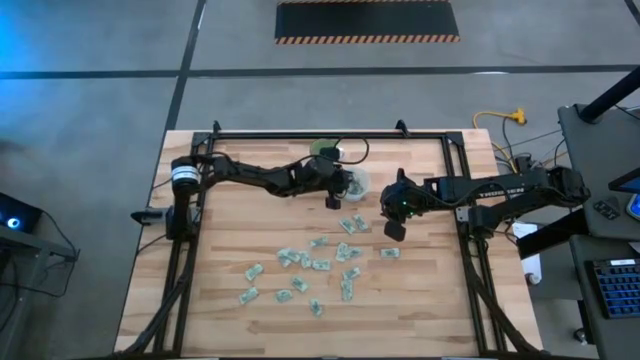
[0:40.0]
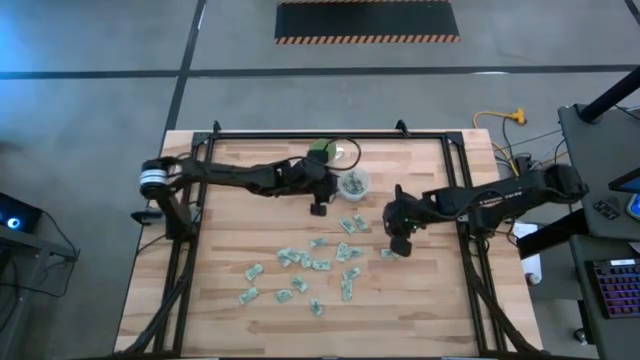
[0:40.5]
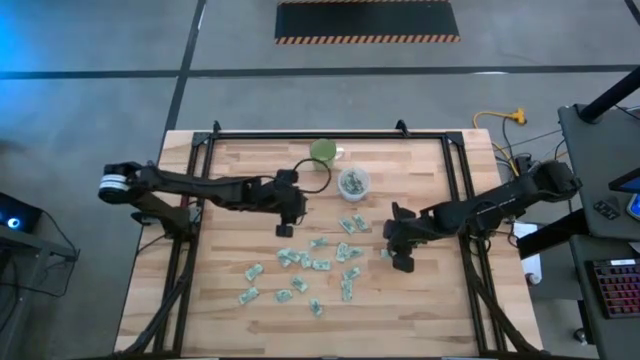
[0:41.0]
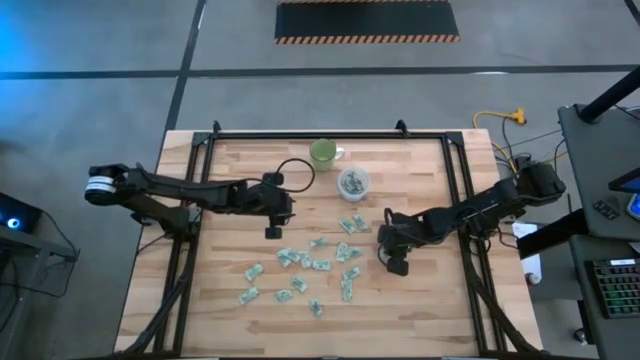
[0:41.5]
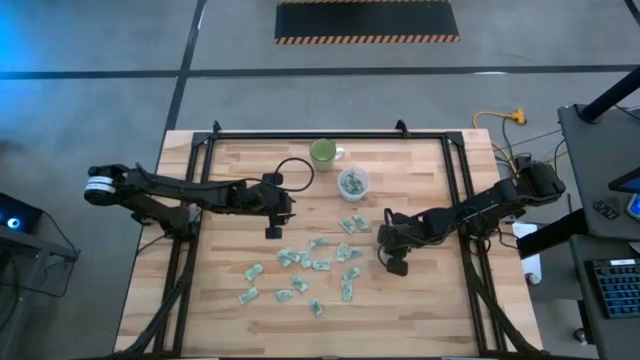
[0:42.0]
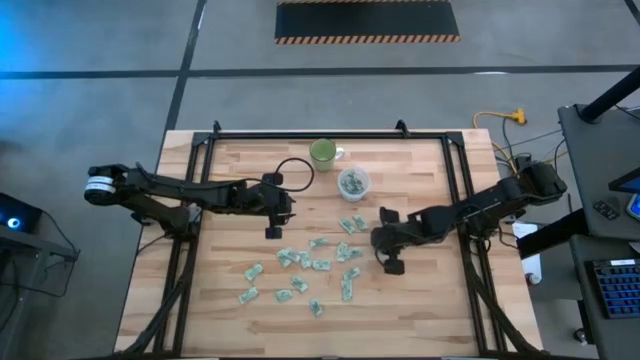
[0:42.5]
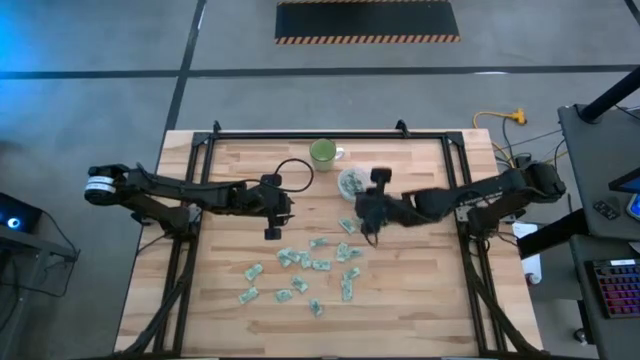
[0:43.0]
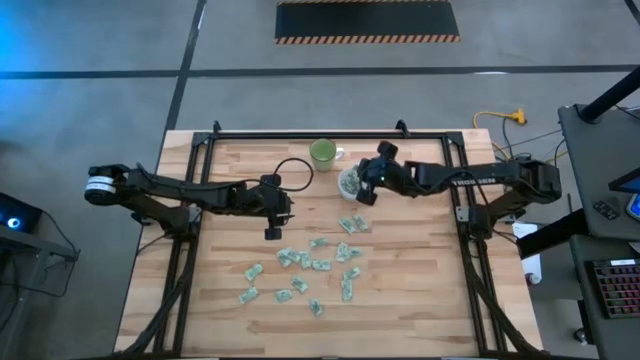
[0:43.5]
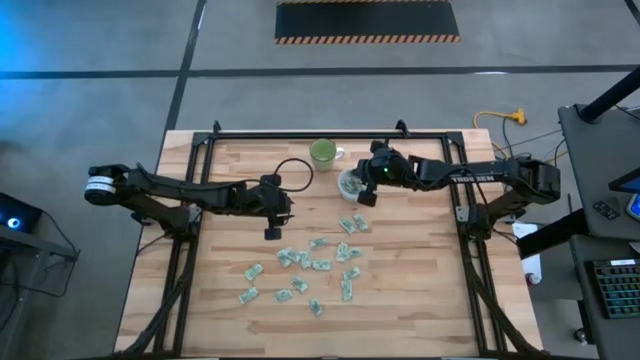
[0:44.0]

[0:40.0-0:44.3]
Task: Pick and place Stevia / Truvia into bins
Put the stevia packet into the transparent container

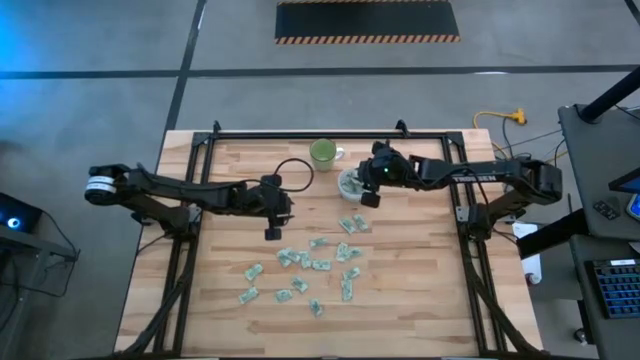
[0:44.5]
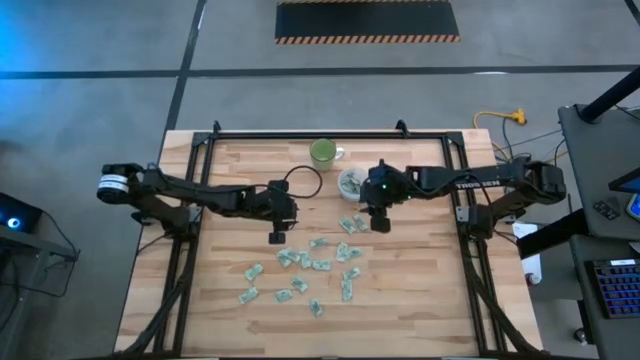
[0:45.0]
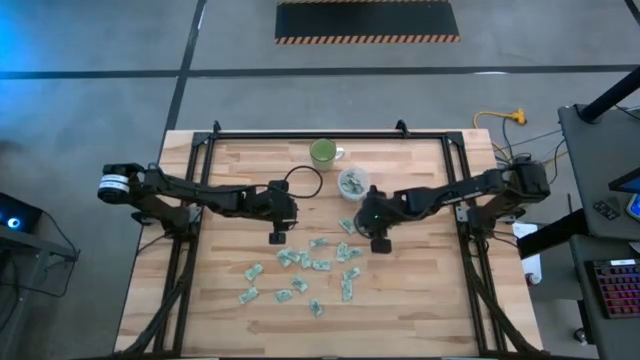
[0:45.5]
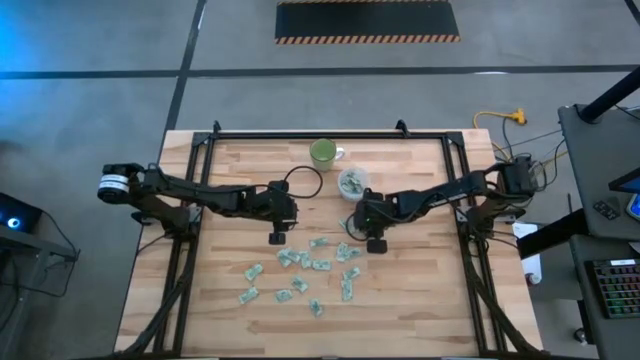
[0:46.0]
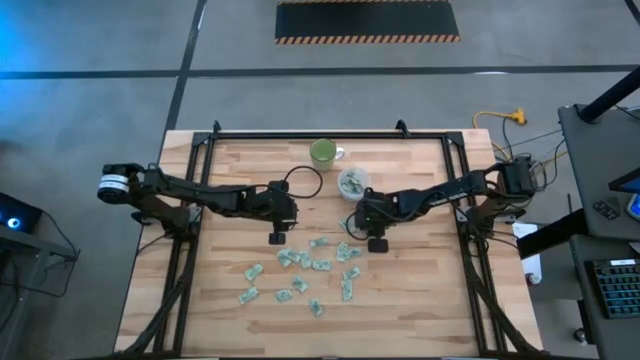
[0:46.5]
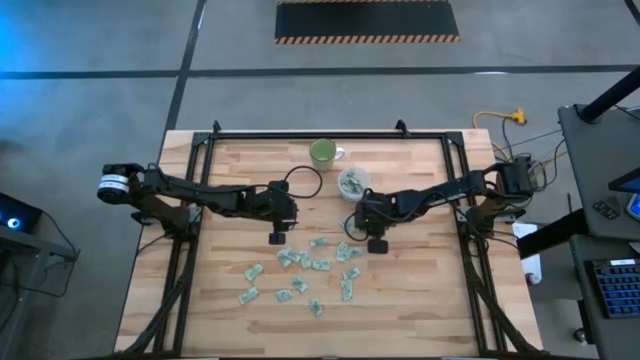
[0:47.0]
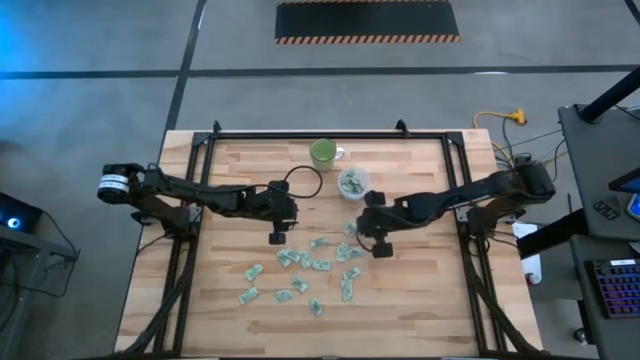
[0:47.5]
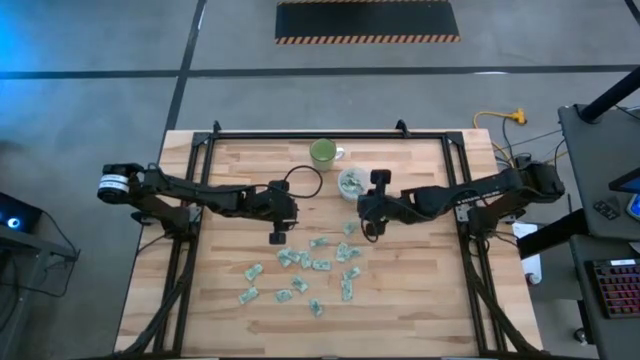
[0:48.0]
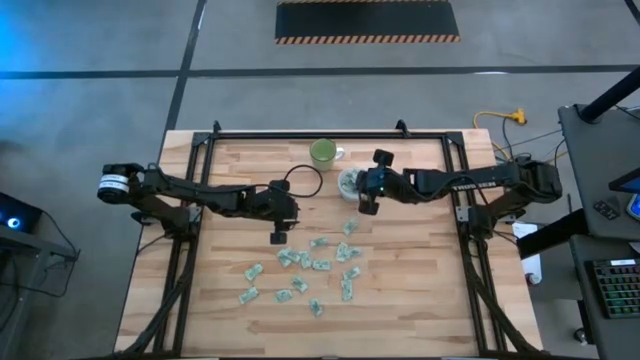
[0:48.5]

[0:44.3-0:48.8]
Put the stevia packet into the transparent container

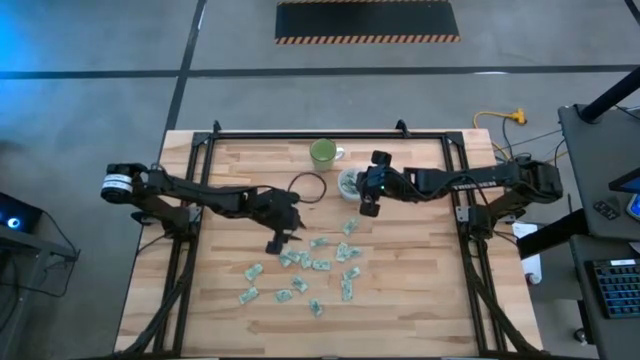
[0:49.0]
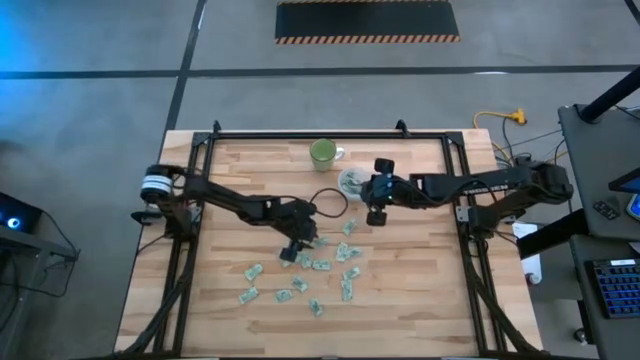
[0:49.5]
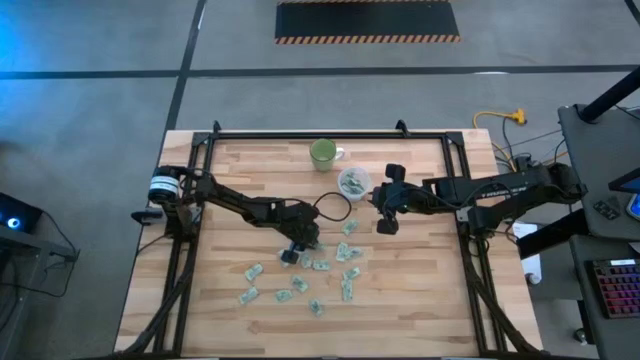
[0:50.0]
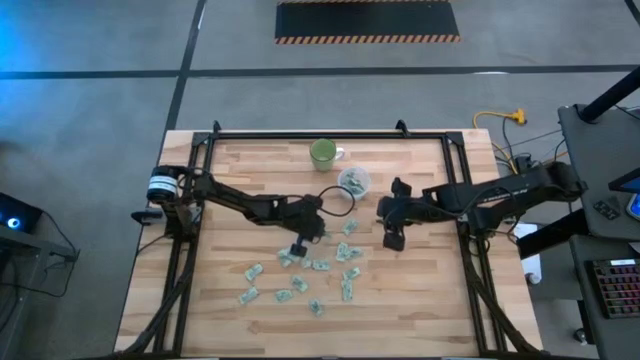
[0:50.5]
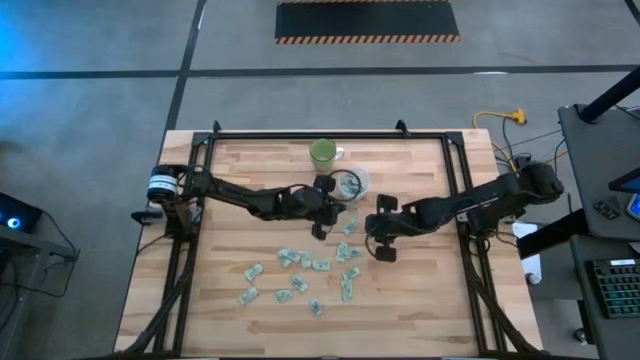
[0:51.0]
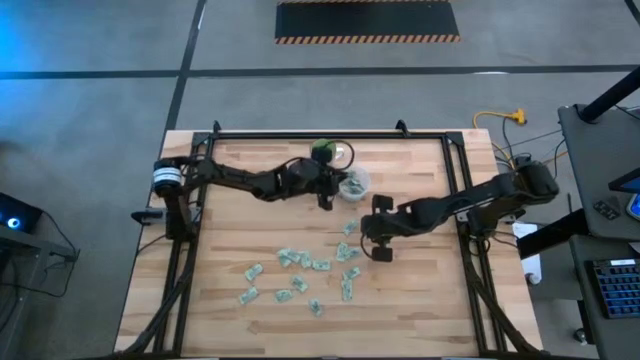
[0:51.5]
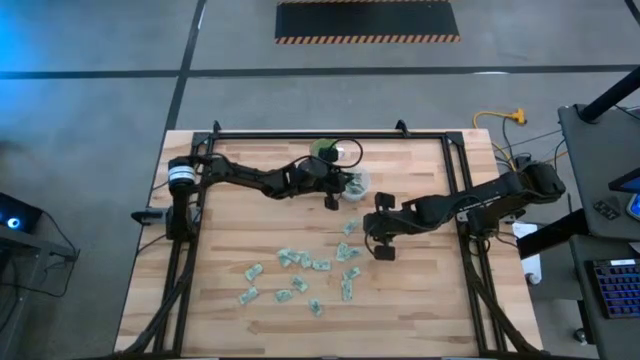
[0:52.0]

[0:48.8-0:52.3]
Put the stevia packet into the transparent container

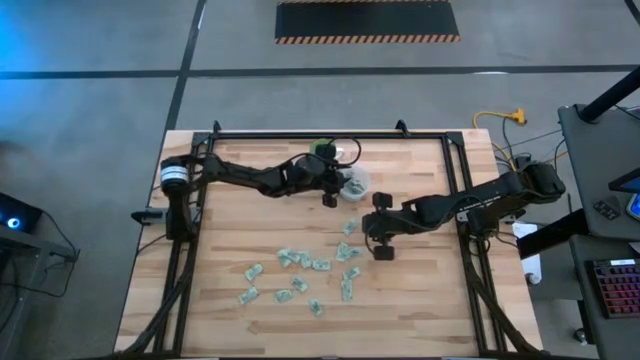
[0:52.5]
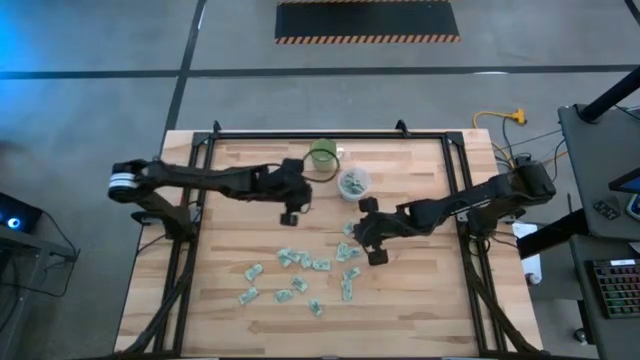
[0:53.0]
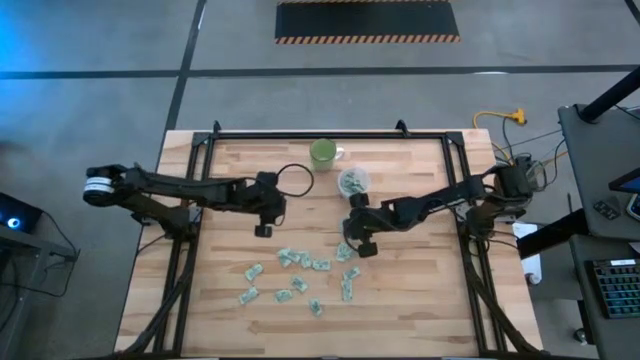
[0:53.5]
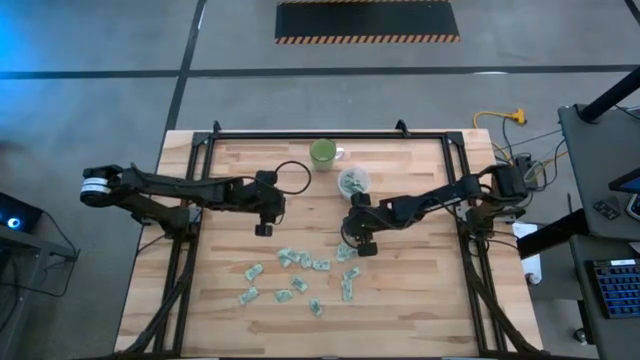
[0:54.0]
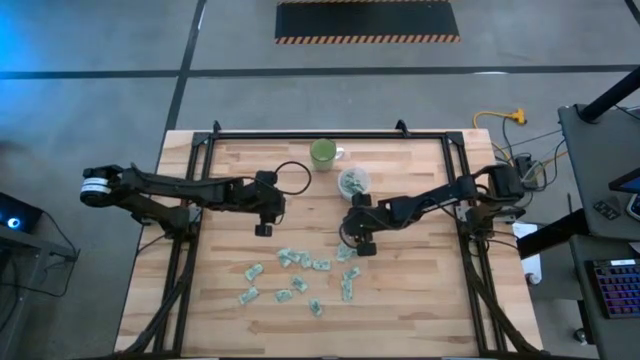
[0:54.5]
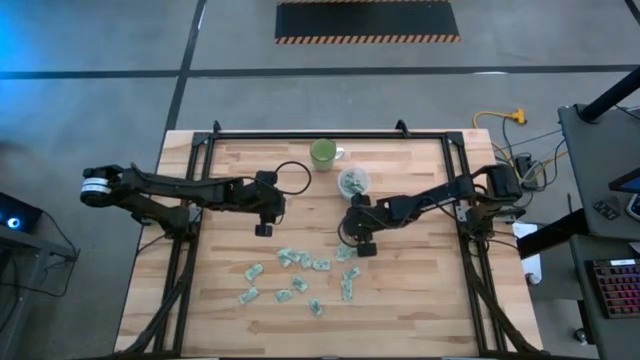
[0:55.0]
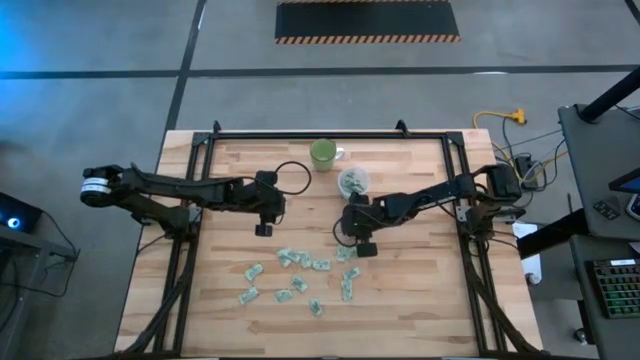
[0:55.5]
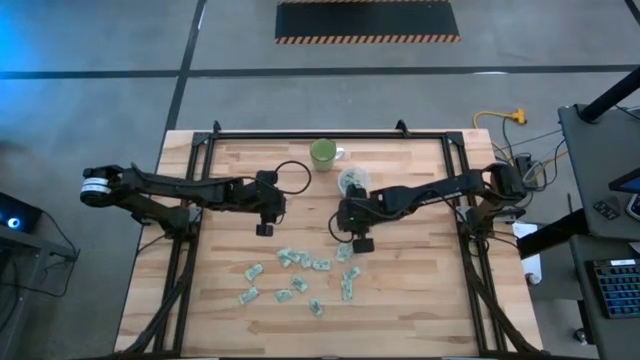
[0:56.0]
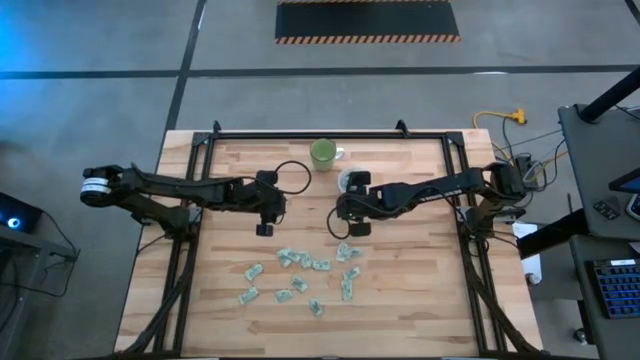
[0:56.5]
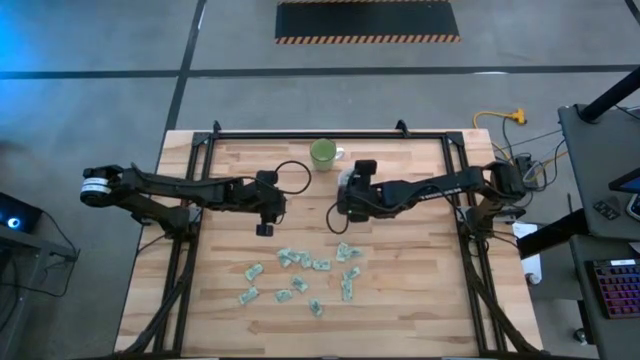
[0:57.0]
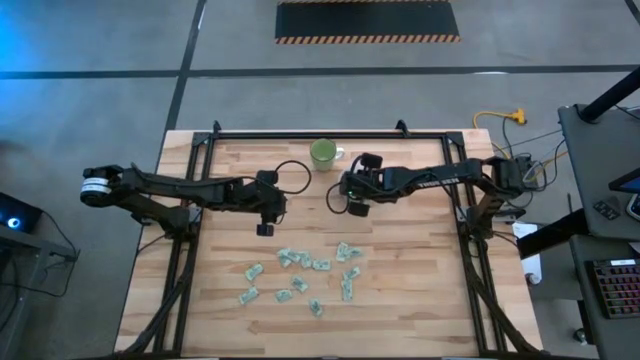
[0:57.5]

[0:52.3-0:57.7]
Put the stevia packet into the transparent container

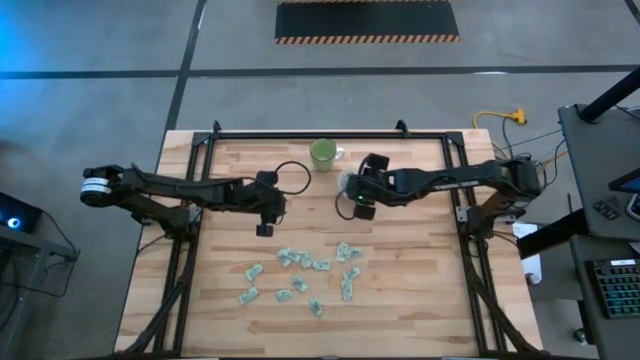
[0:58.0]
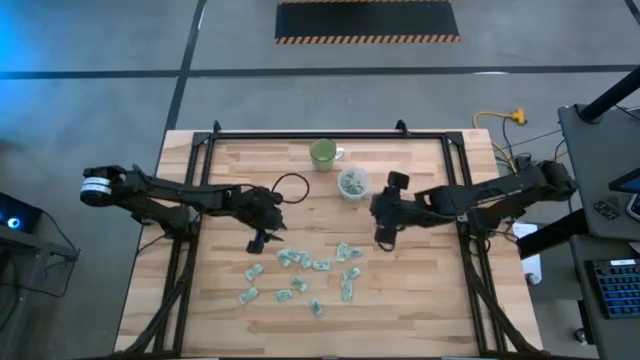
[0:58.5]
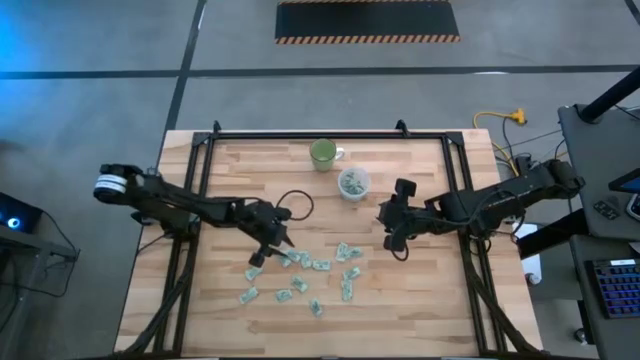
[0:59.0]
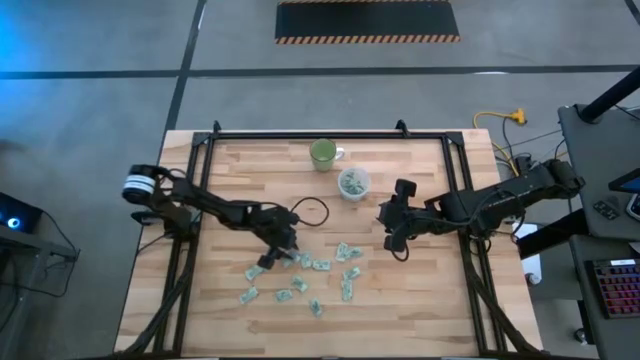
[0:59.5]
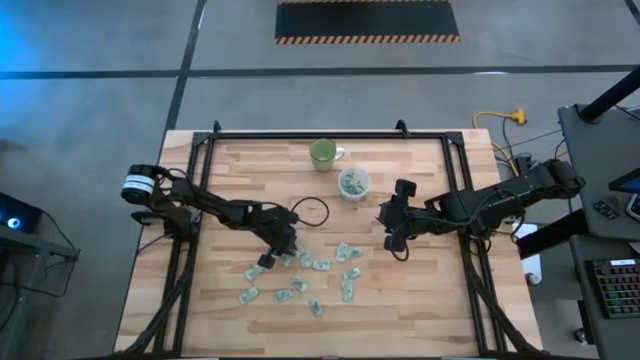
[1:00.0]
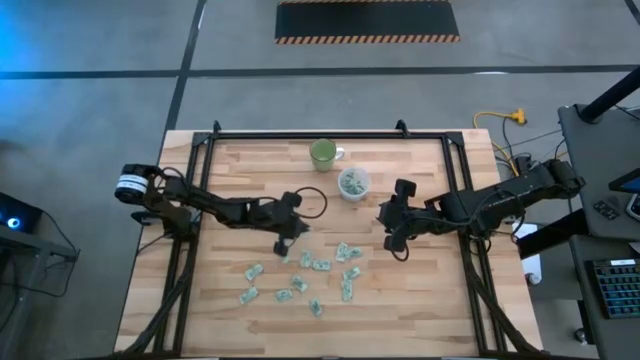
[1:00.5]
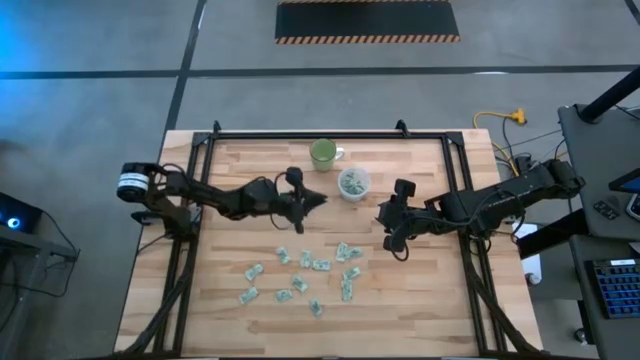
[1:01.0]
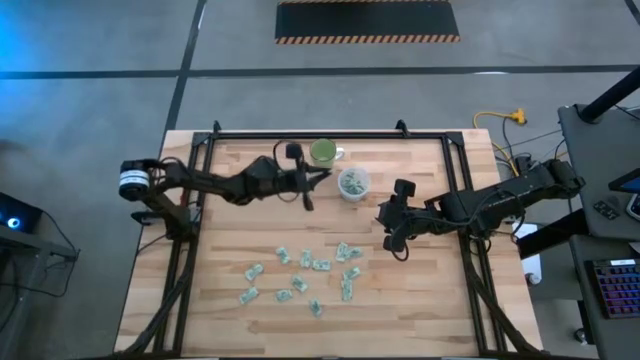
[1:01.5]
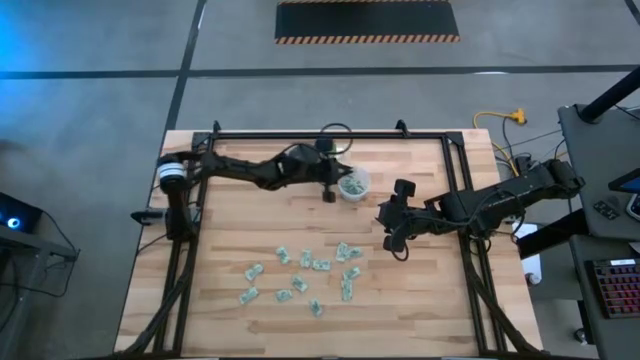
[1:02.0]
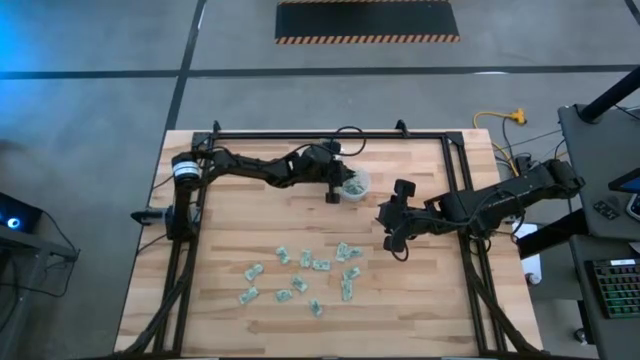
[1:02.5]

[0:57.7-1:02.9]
Put the stevia packet into the transparent container
